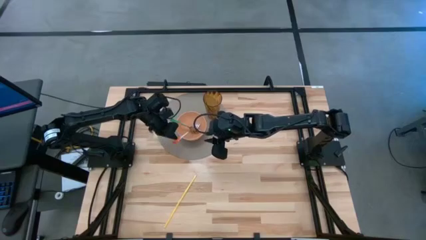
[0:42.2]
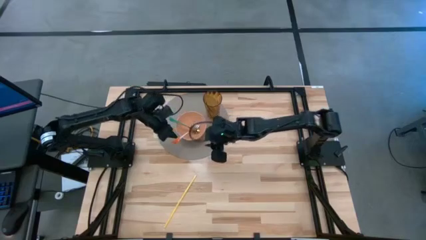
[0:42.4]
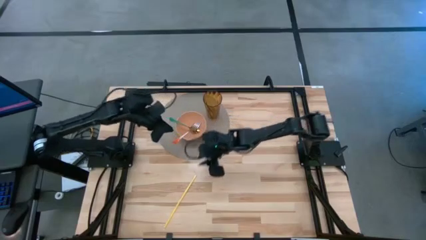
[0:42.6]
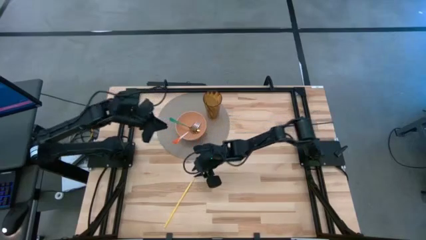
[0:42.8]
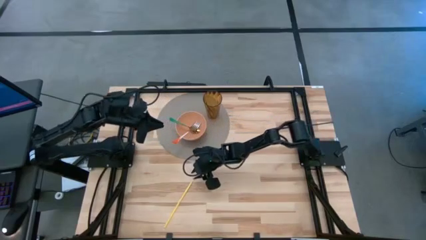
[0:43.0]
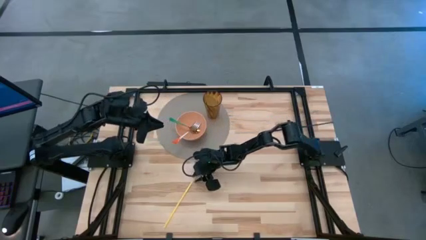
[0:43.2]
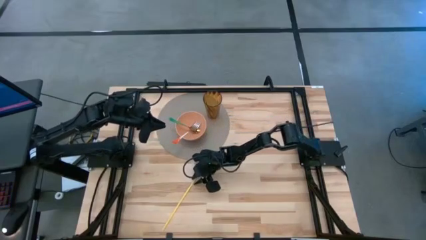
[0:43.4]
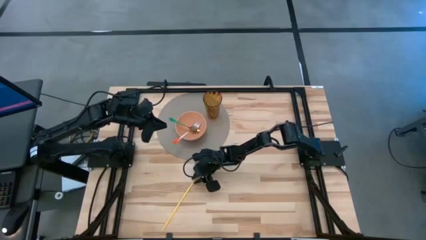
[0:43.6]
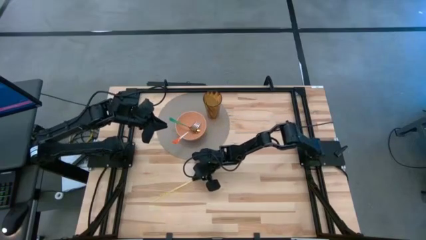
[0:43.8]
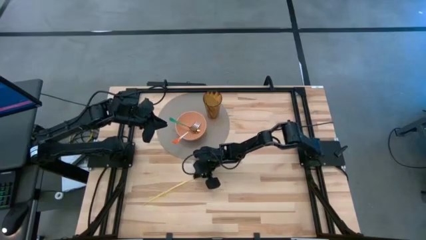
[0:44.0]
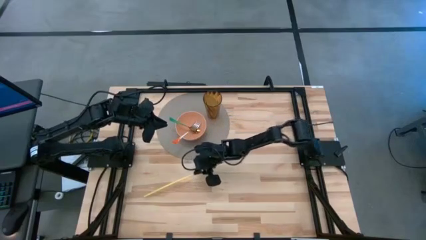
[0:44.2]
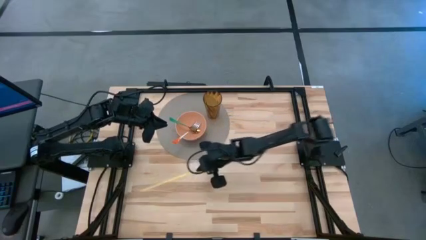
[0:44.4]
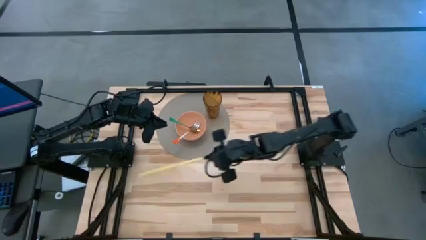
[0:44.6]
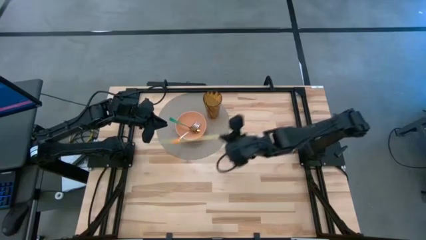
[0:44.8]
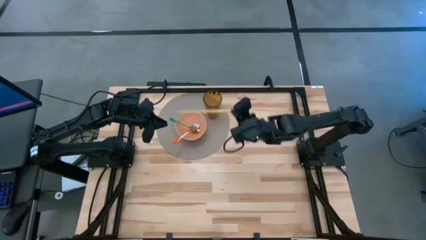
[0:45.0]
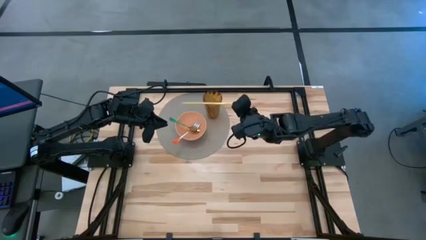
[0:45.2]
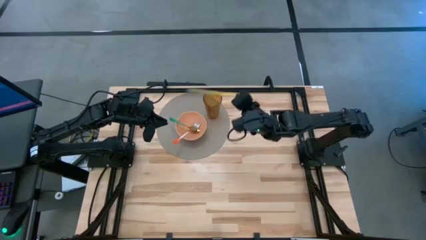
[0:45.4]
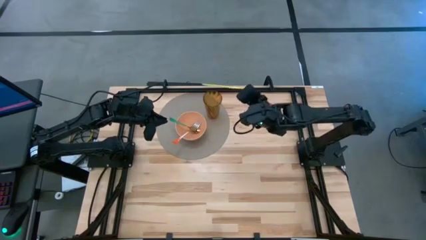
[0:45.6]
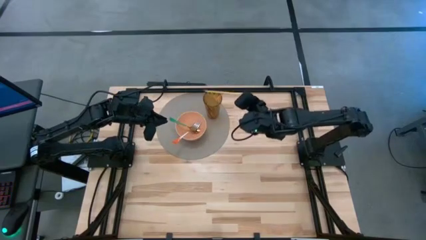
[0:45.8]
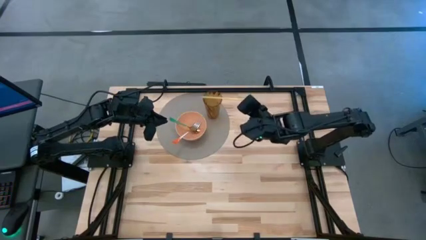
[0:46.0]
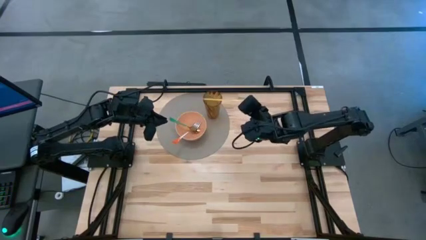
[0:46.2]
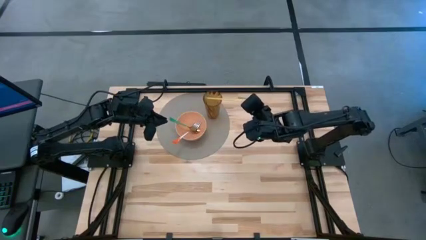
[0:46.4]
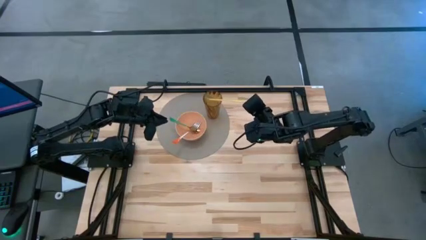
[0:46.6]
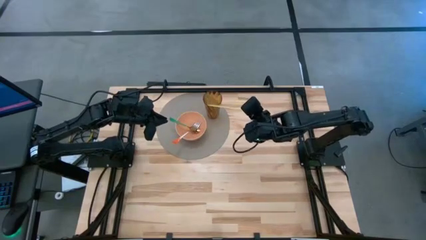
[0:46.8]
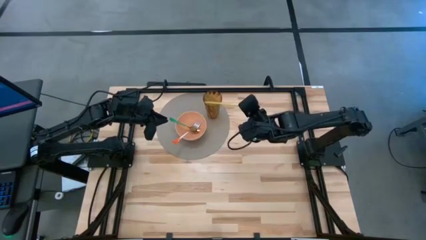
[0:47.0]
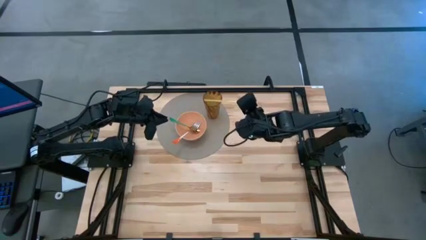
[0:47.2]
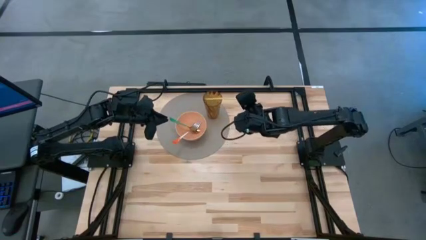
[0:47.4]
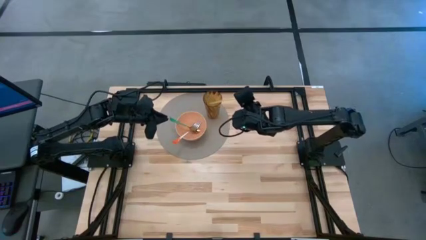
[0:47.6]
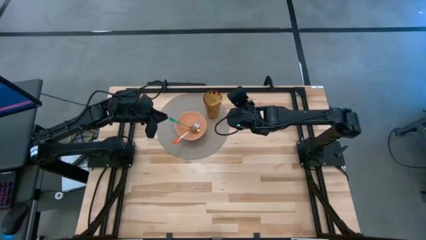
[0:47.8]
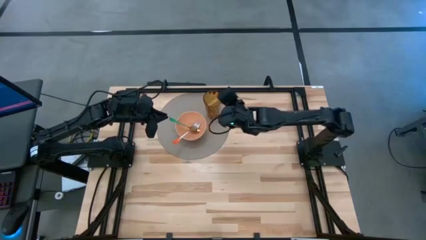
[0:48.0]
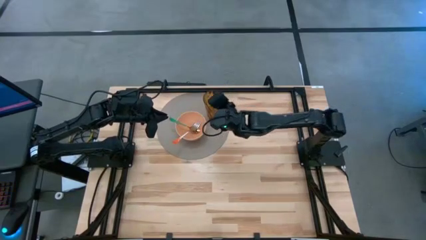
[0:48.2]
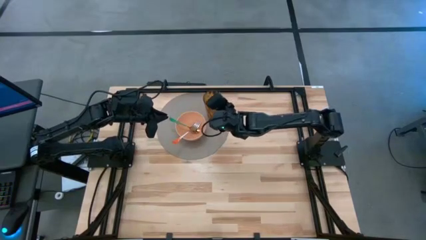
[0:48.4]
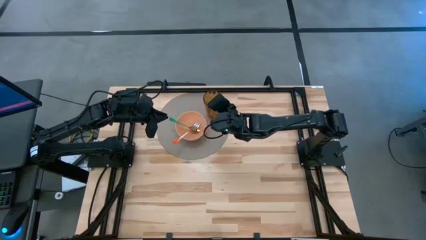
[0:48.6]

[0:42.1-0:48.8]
Task: Pick & Place Utensil
Put the yellow straw into the brown cup on the gray mat

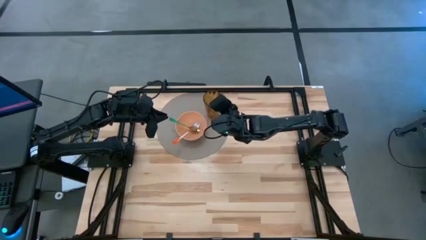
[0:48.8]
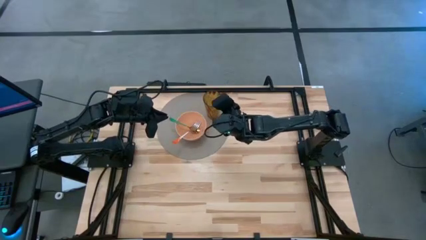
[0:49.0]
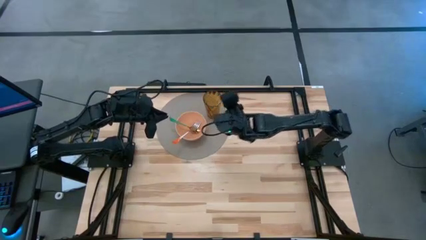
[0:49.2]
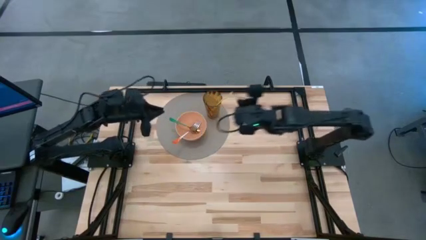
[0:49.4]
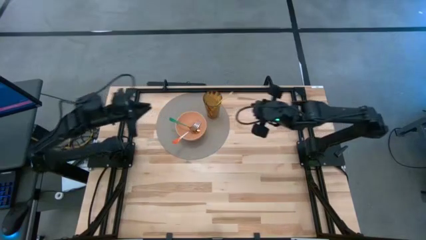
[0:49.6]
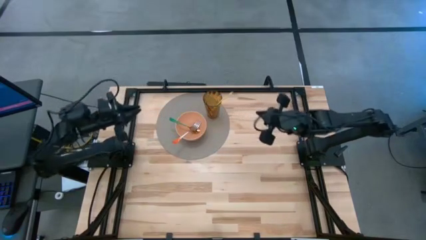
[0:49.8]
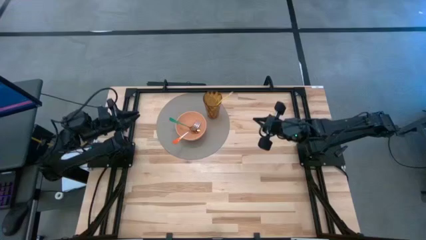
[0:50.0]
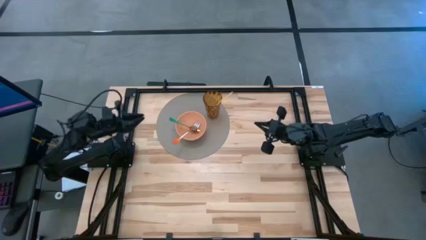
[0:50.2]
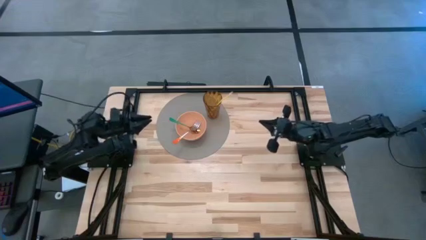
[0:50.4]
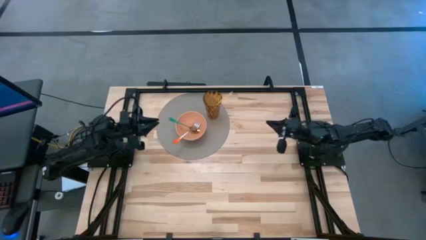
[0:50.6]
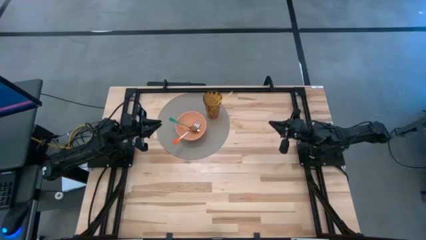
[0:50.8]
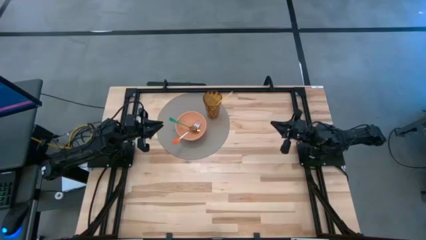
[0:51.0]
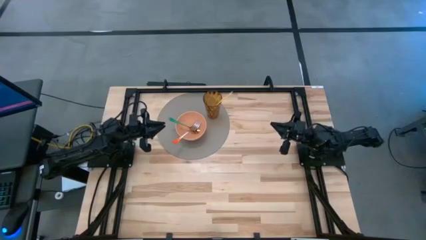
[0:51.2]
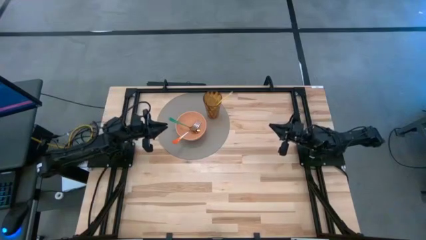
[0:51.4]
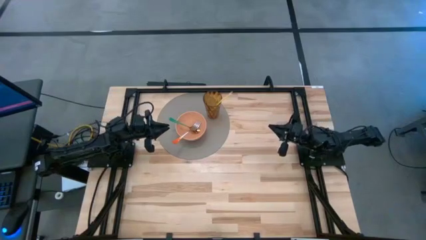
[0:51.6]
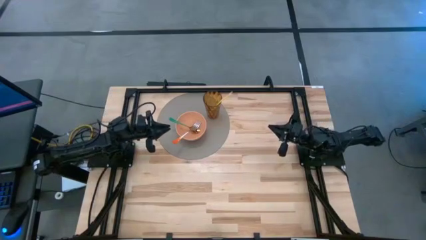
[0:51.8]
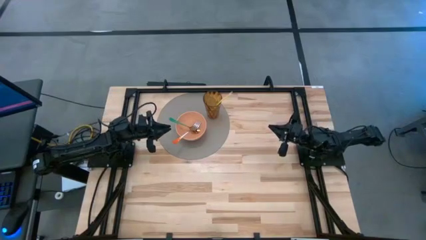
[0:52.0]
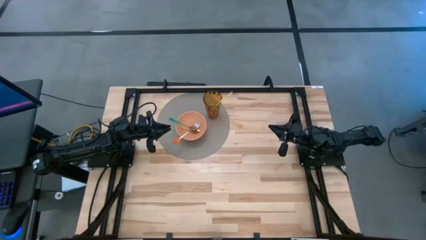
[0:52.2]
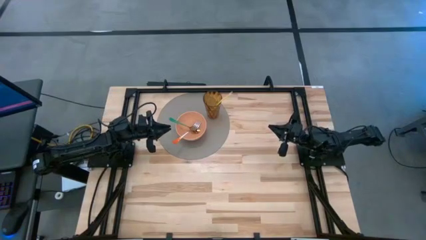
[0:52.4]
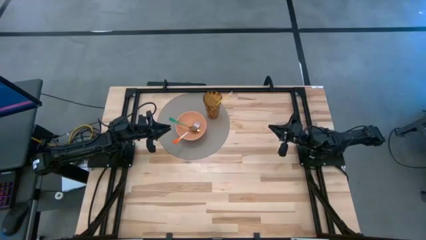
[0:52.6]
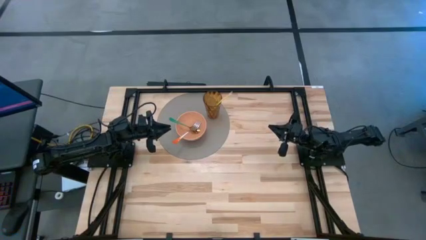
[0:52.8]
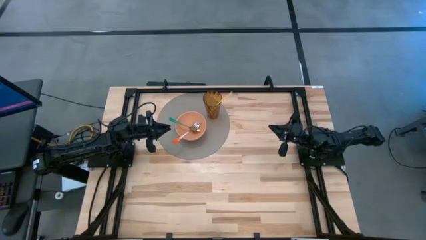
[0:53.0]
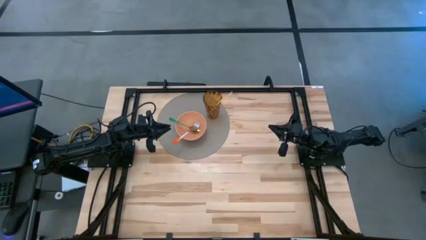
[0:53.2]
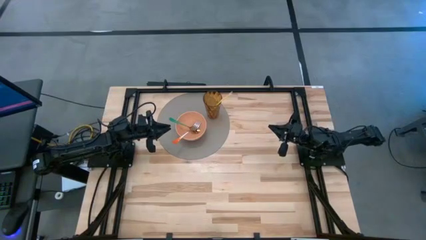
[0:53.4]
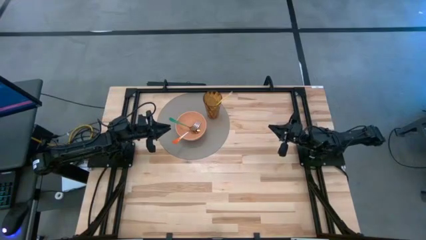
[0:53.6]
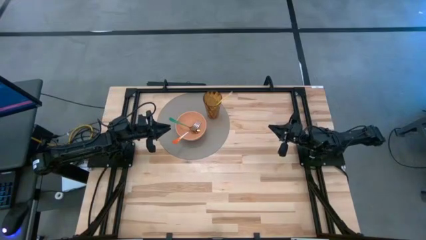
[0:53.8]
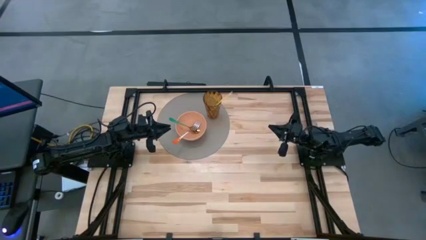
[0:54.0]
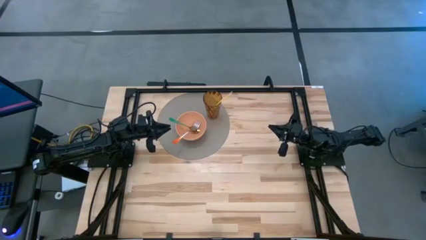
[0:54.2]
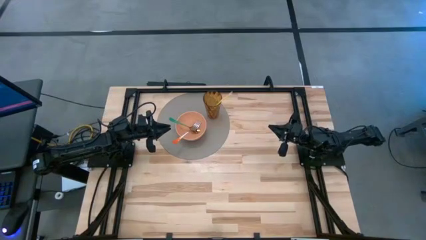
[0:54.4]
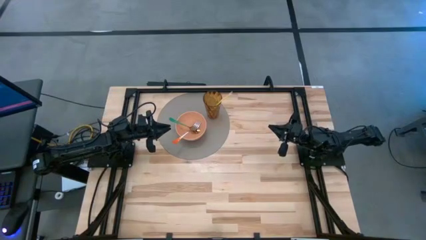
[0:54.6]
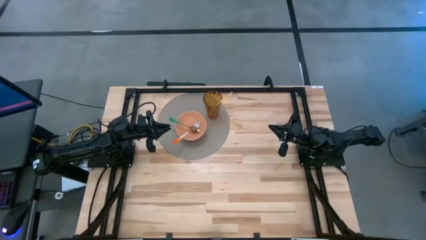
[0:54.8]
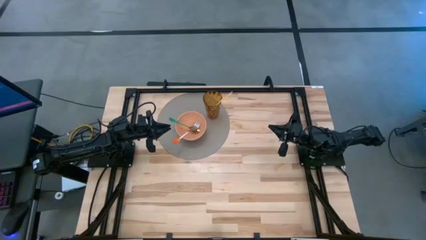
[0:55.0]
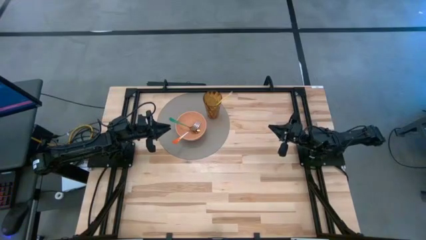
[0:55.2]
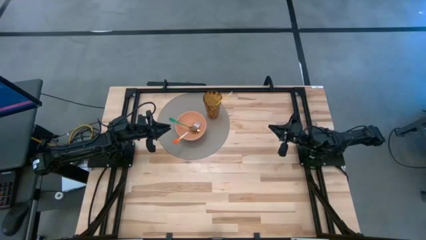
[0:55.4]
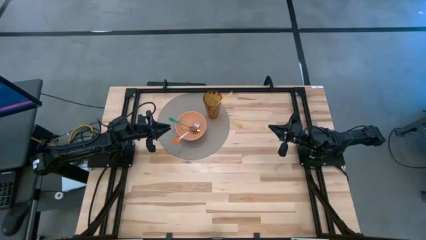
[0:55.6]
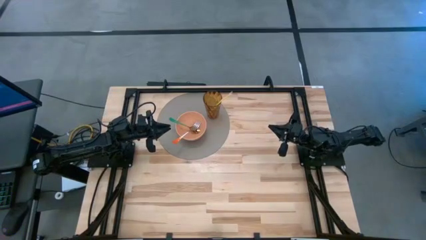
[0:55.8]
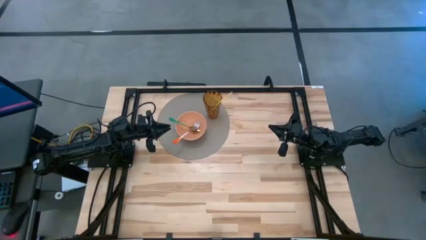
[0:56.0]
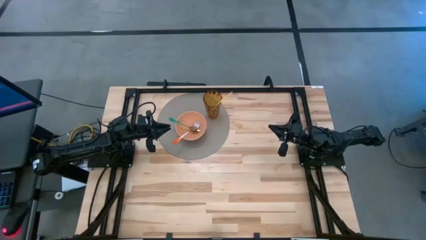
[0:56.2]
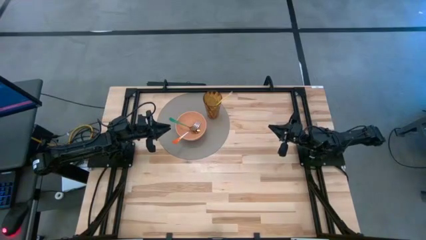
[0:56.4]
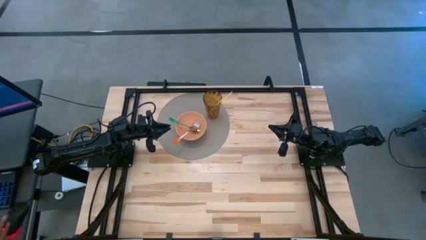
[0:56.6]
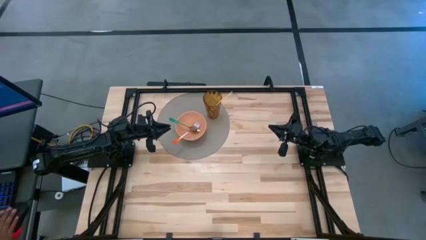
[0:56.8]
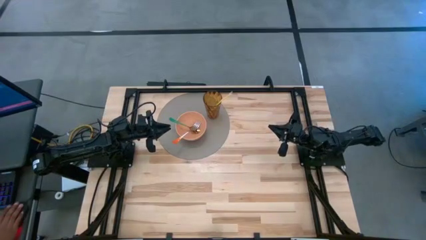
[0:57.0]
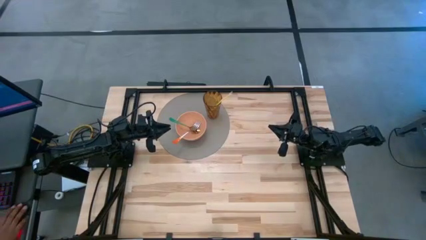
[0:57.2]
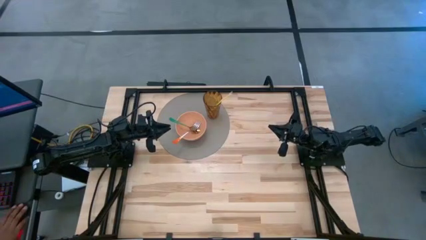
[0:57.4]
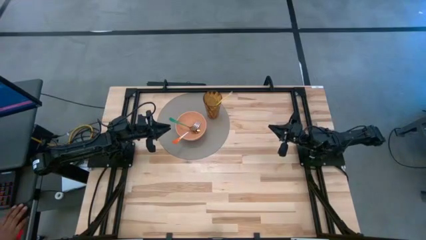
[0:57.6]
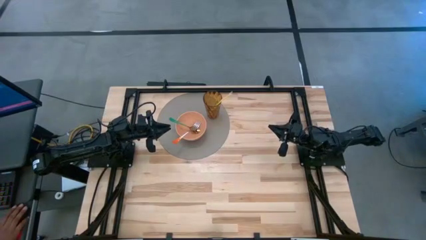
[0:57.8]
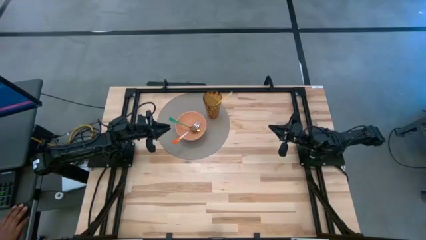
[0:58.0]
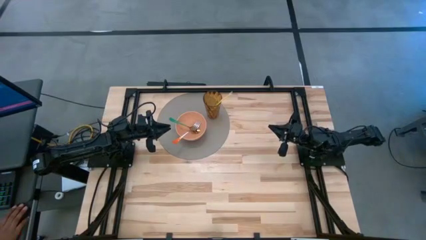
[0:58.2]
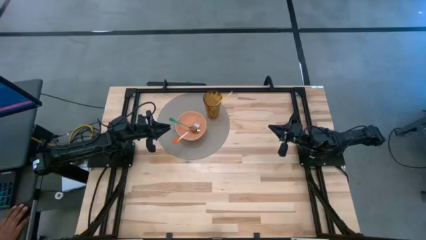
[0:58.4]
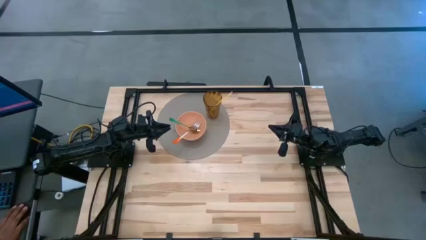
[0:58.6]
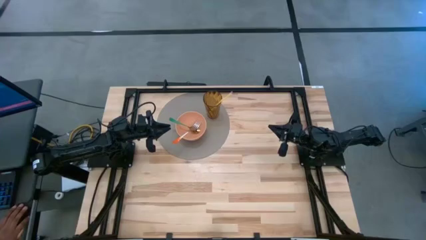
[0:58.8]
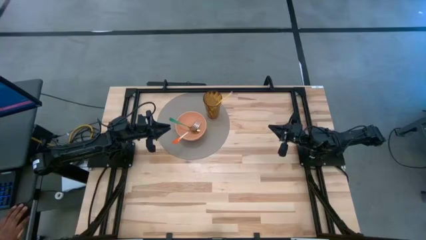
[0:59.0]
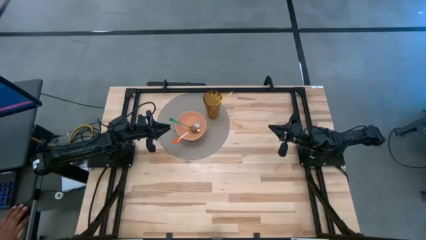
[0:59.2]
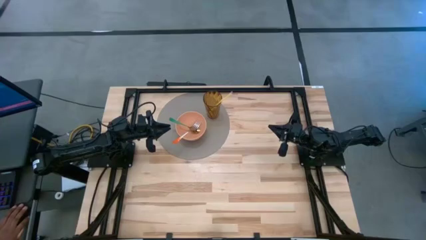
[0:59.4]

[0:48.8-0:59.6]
Return to Home Position
